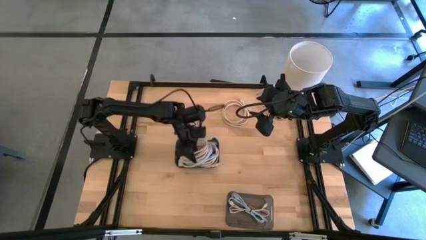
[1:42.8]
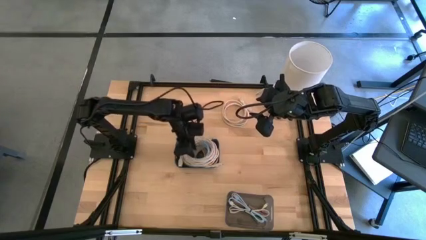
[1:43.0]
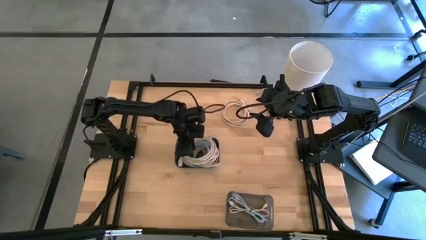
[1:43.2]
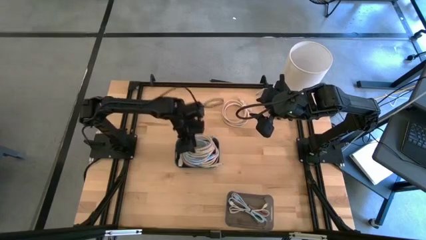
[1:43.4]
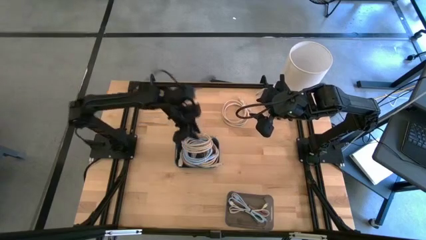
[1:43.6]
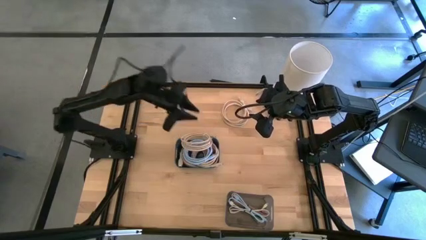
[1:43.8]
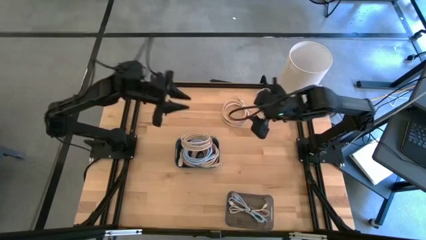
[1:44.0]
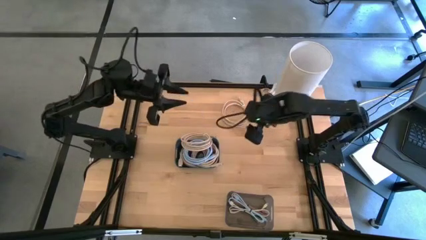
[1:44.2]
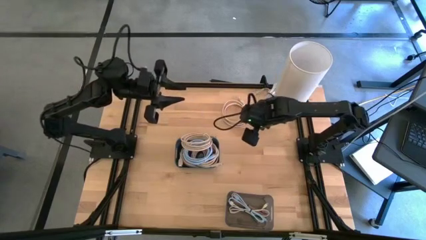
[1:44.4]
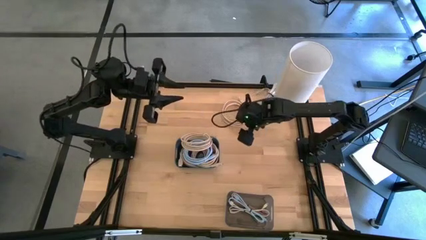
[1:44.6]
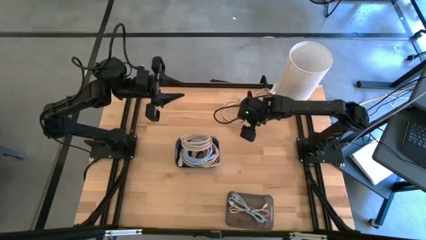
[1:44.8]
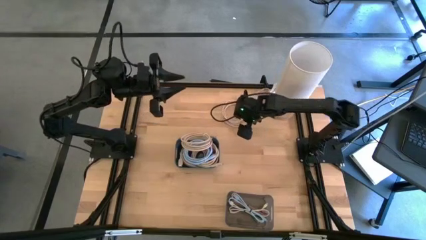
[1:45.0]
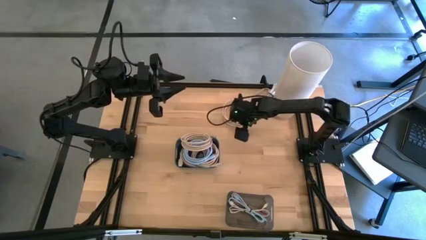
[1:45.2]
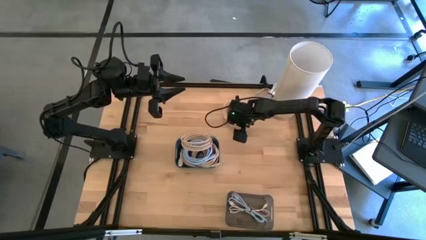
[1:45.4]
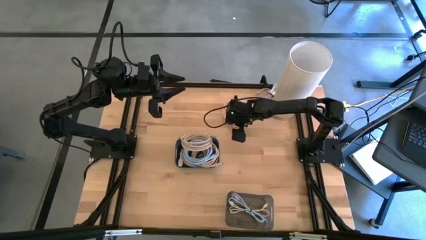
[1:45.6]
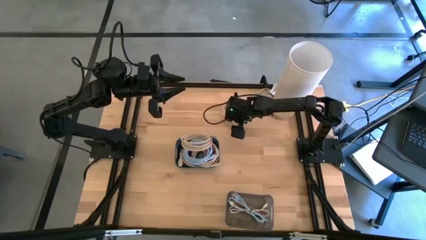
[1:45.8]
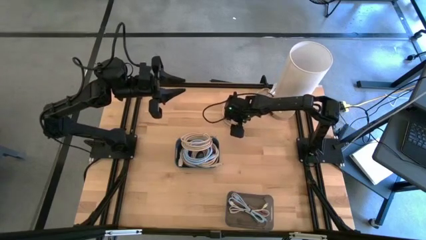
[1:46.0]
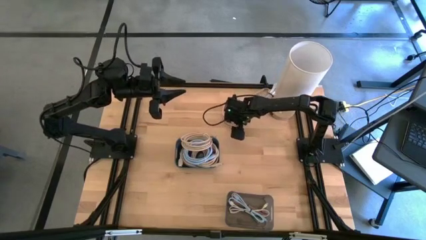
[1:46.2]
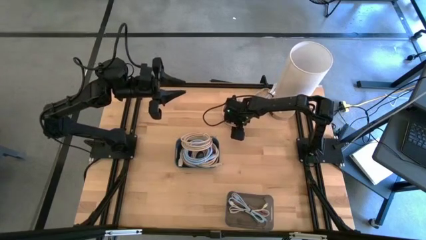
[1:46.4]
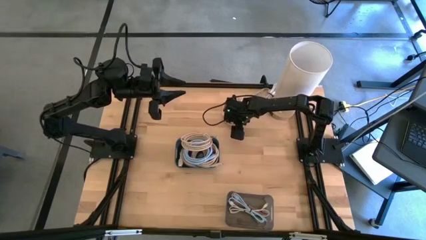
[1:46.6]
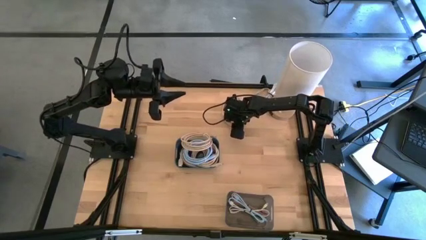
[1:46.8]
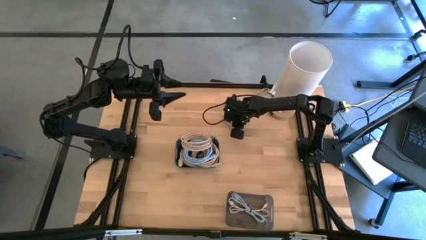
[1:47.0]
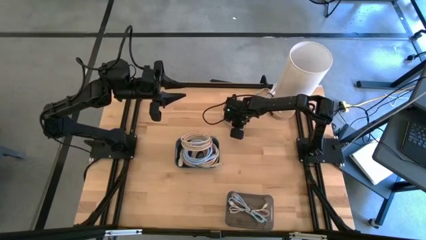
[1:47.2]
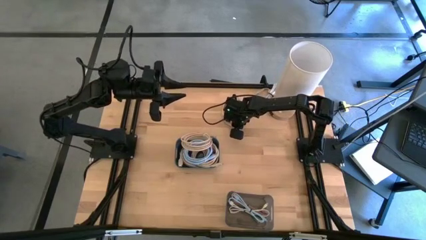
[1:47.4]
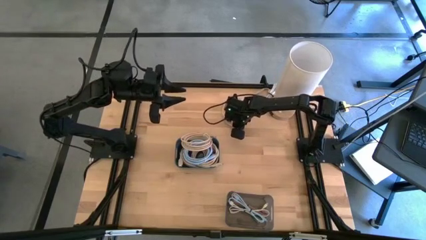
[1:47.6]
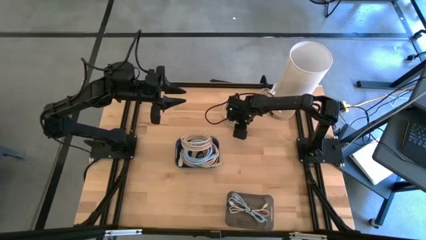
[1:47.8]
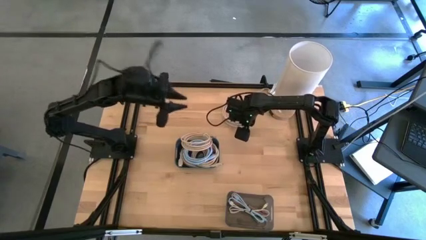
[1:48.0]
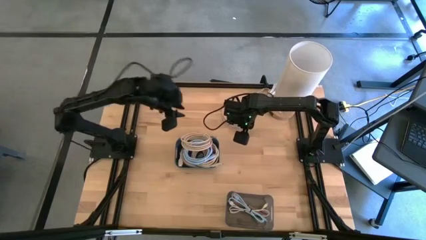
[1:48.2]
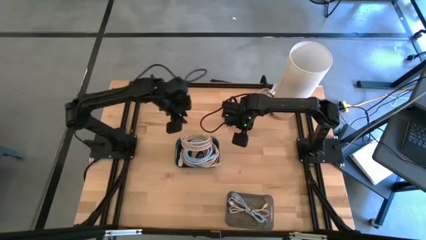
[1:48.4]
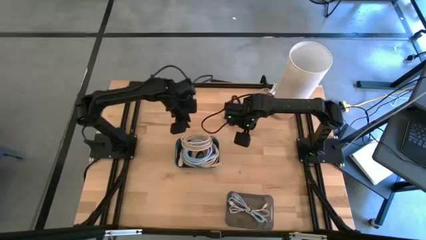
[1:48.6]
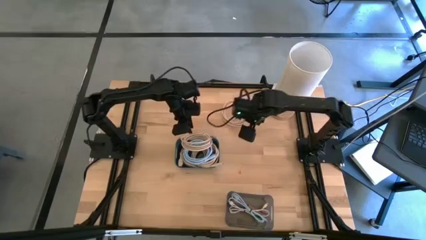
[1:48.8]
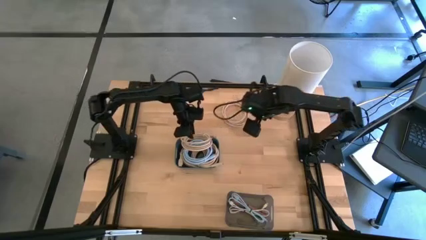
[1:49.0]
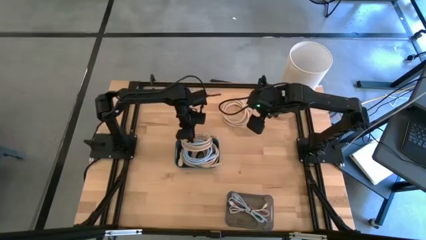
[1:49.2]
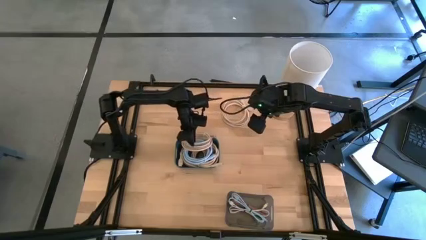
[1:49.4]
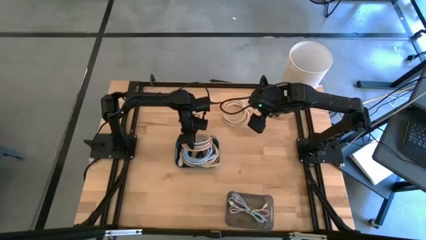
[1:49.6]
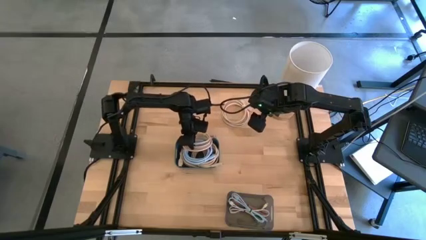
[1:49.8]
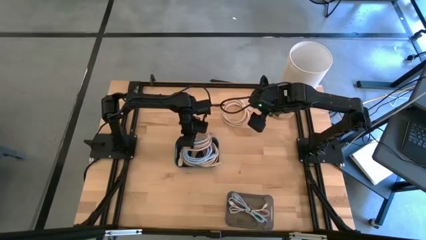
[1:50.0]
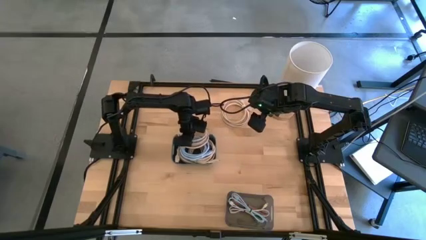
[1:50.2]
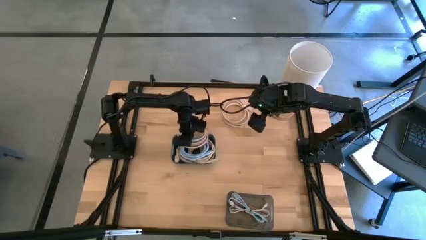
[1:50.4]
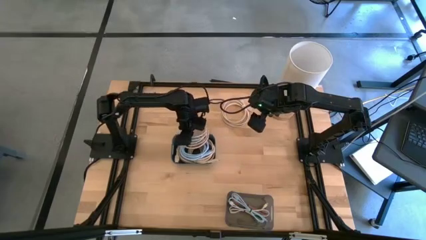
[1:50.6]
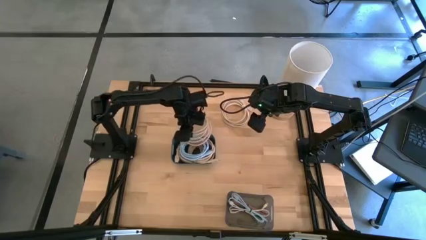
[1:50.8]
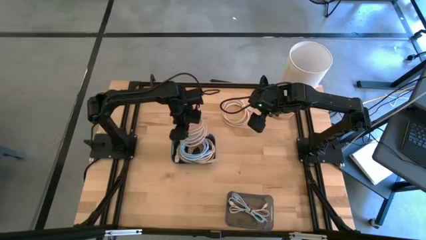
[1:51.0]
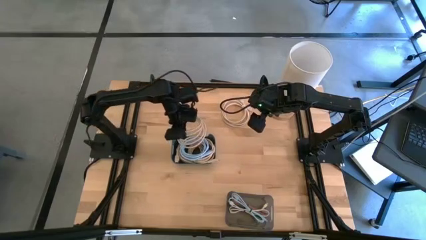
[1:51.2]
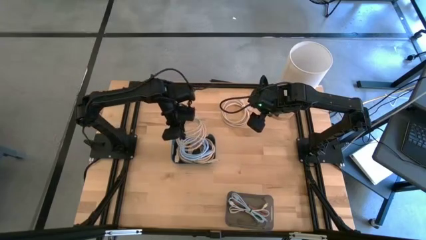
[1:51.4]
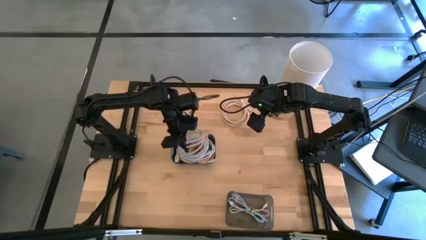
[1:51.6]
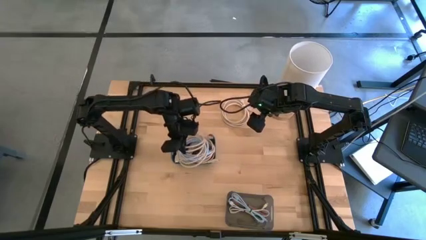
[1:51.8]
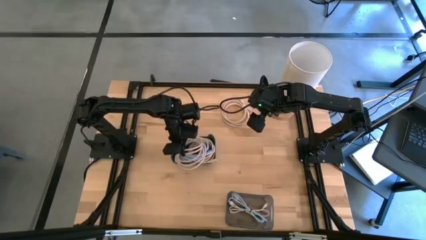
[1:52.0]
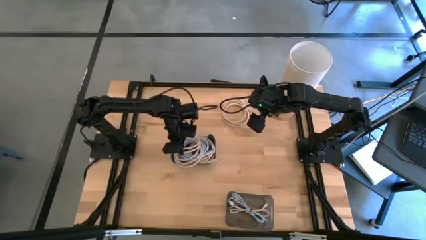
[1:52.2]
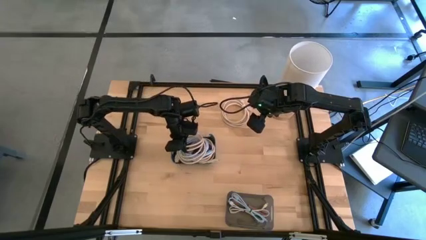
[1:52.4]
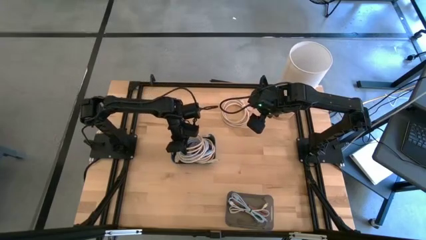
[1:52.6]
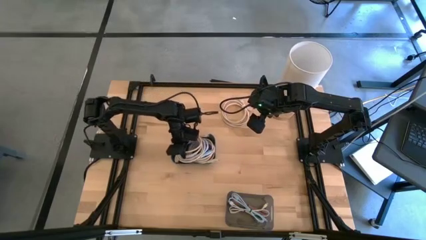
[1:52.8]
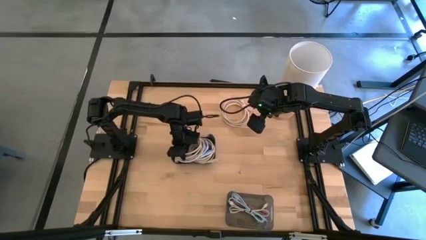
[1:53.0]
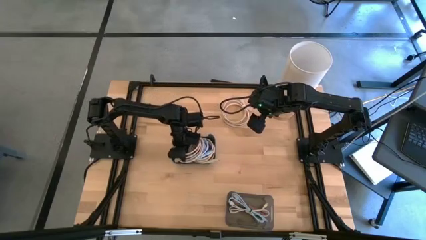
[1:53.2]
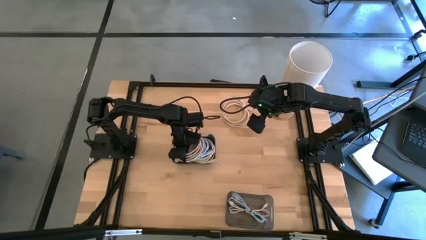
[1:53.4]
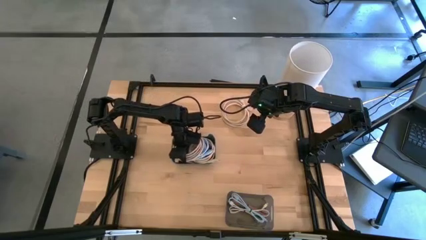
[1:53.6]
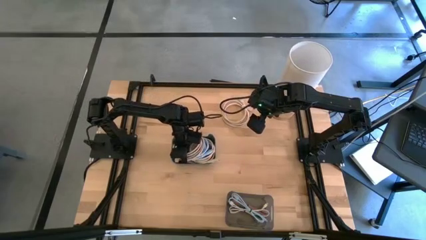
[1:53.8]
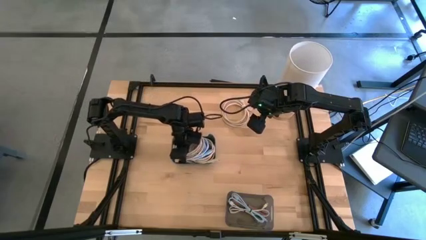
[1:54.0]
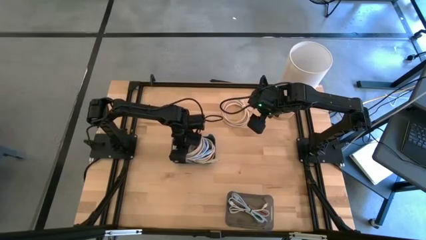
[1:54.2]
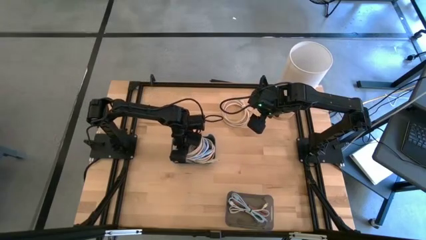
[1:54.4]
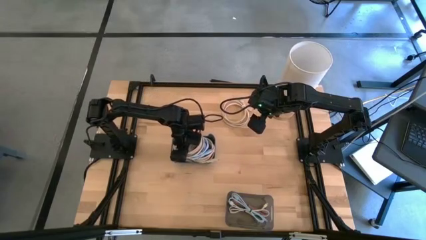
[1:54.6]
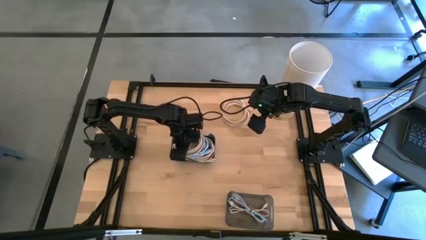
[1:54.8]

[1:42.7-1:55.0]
Put the brown charger cable into the blue bin
